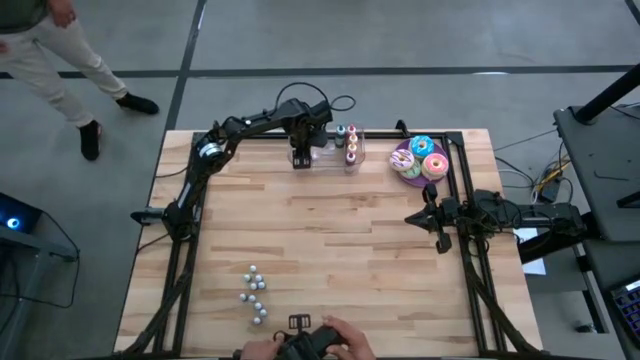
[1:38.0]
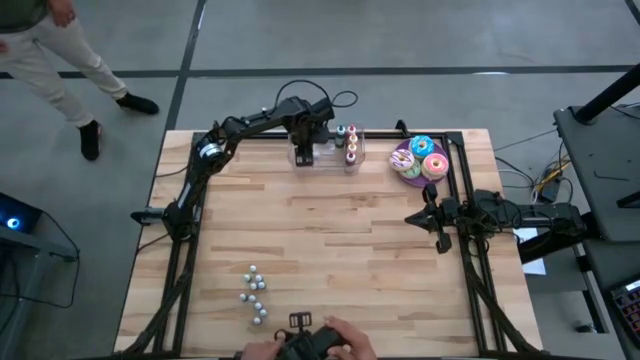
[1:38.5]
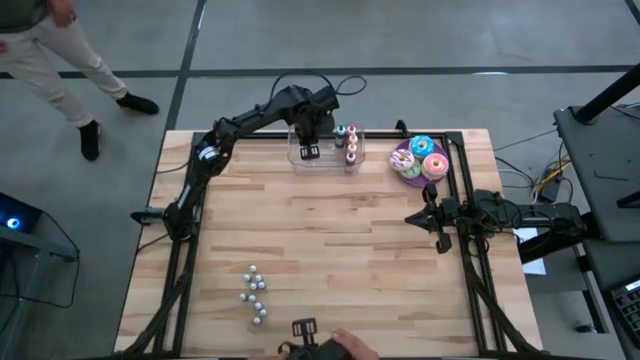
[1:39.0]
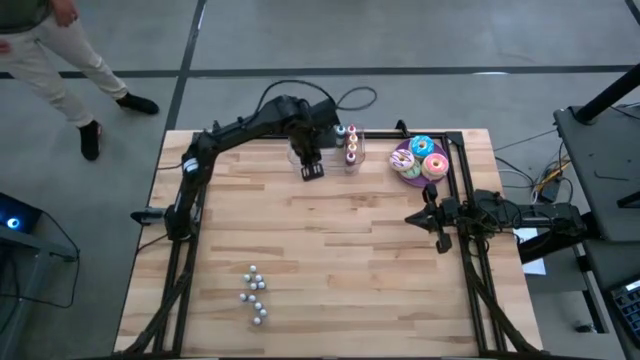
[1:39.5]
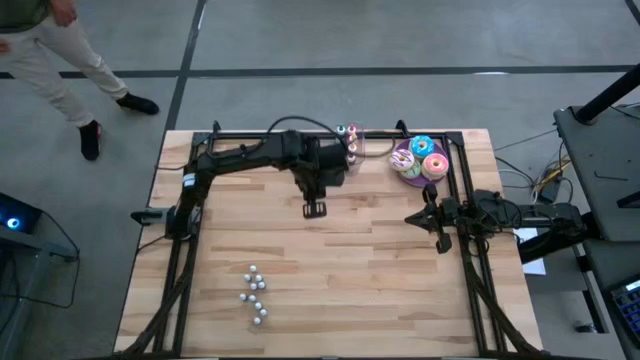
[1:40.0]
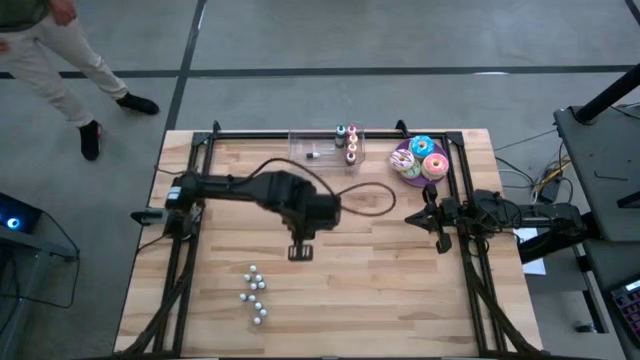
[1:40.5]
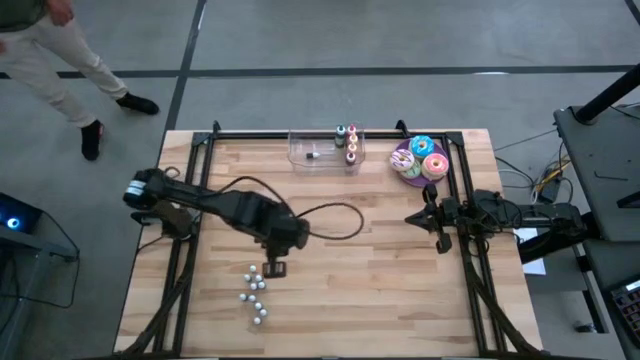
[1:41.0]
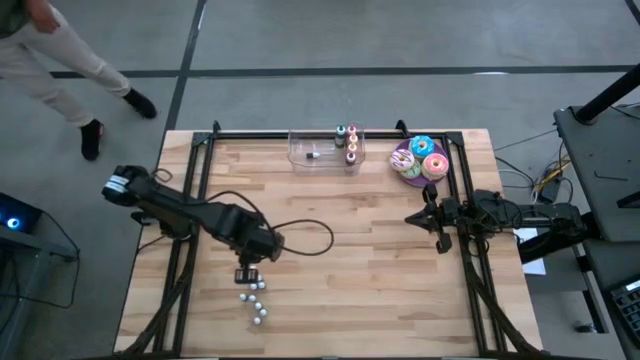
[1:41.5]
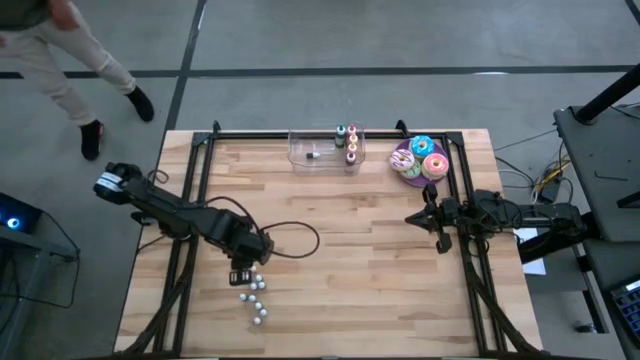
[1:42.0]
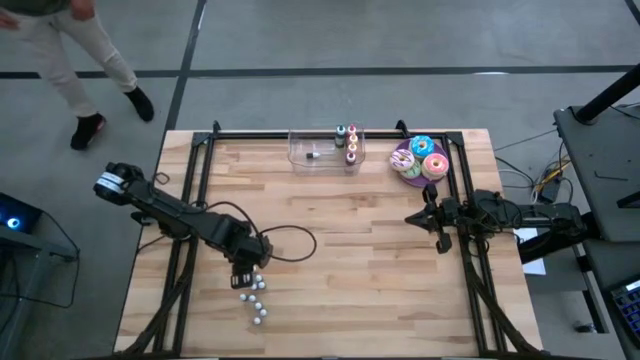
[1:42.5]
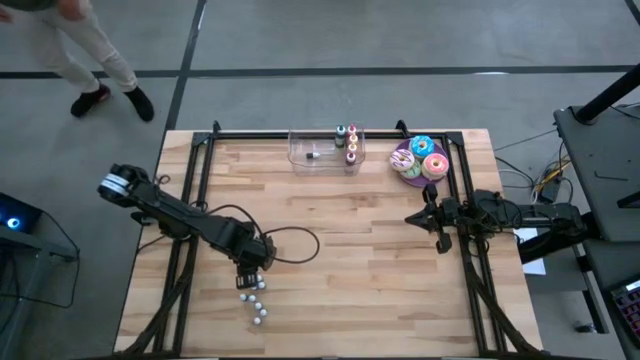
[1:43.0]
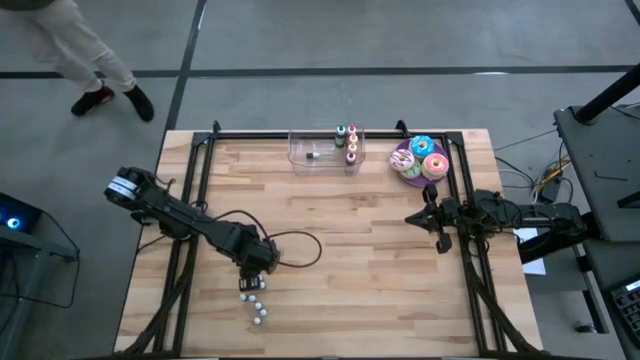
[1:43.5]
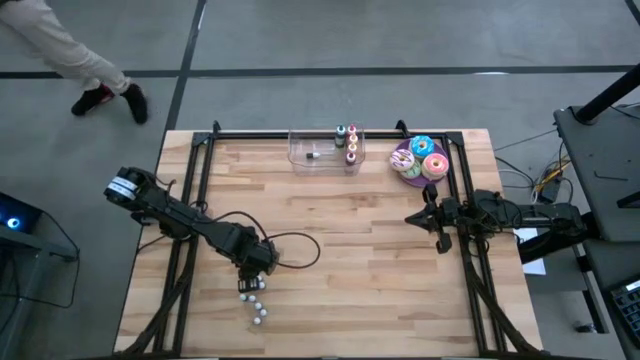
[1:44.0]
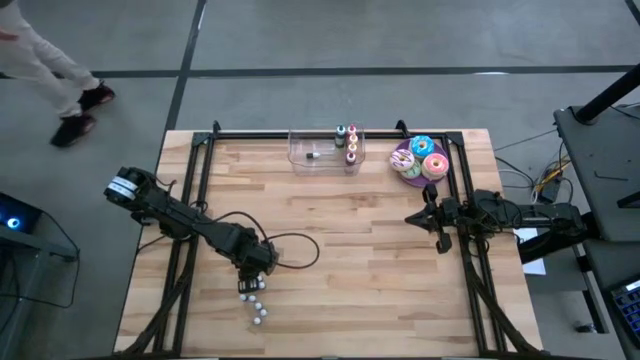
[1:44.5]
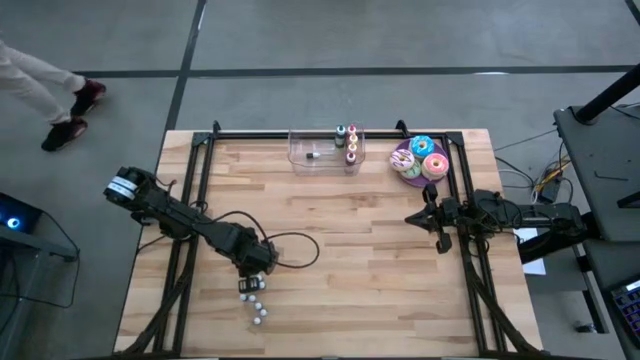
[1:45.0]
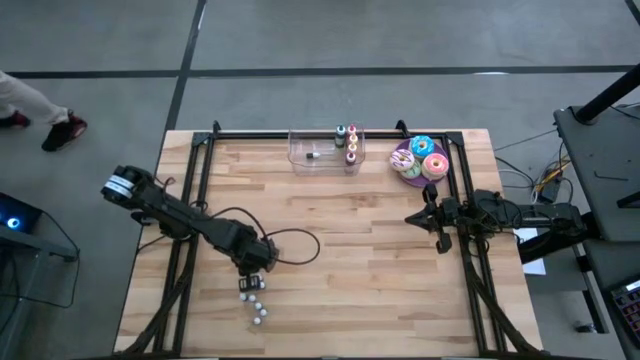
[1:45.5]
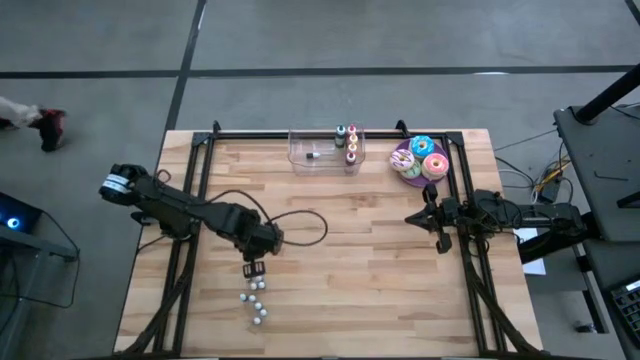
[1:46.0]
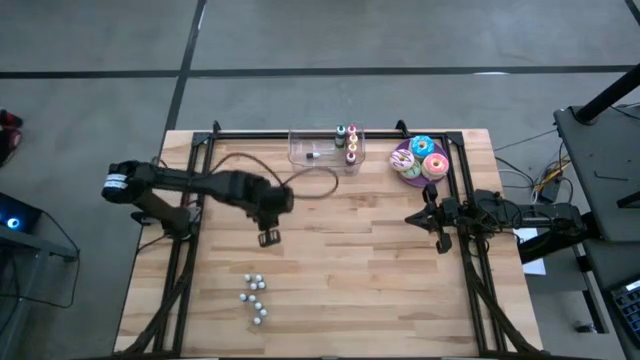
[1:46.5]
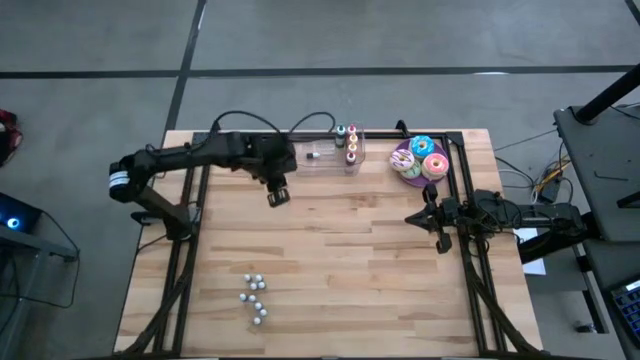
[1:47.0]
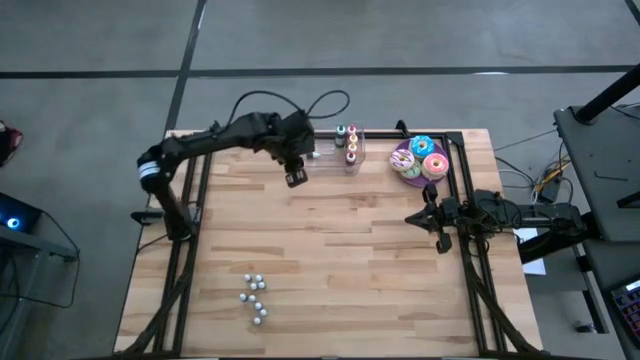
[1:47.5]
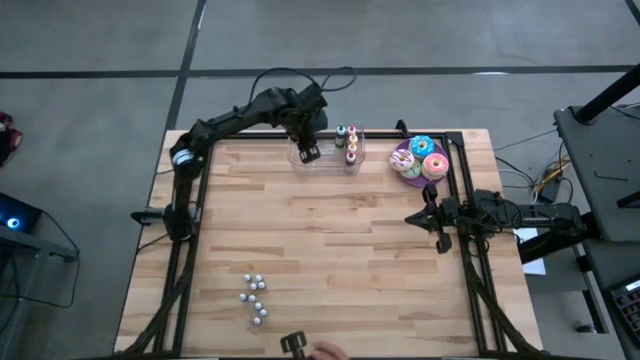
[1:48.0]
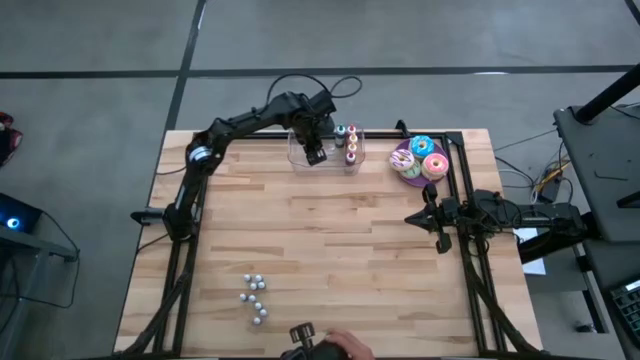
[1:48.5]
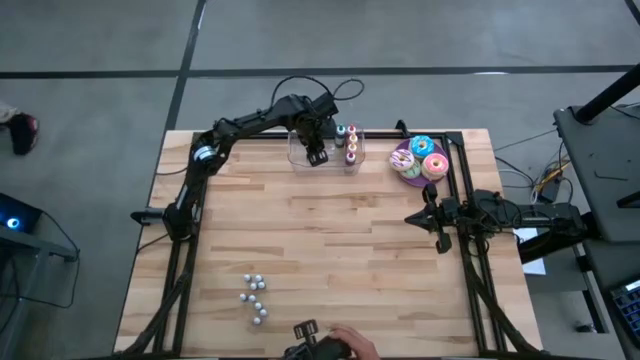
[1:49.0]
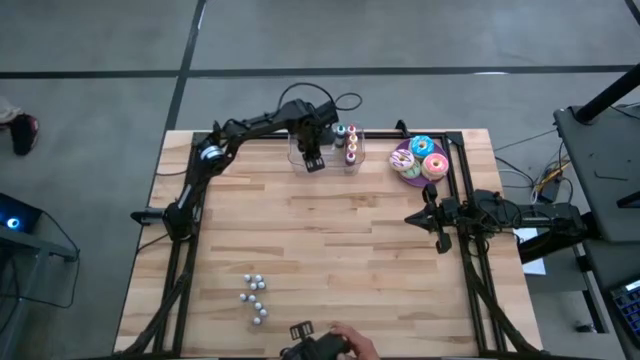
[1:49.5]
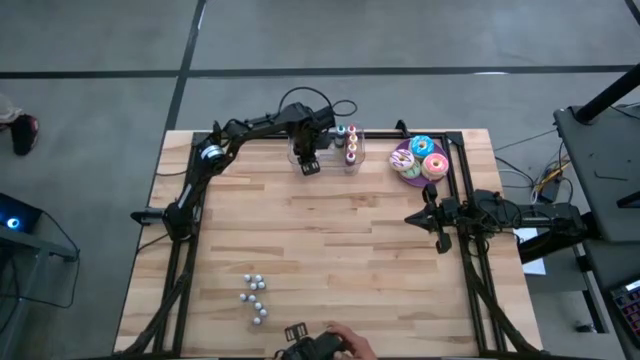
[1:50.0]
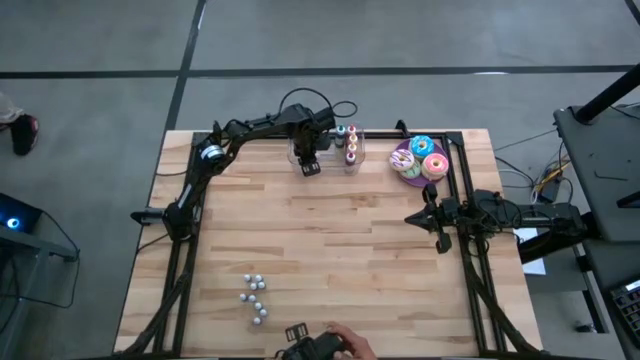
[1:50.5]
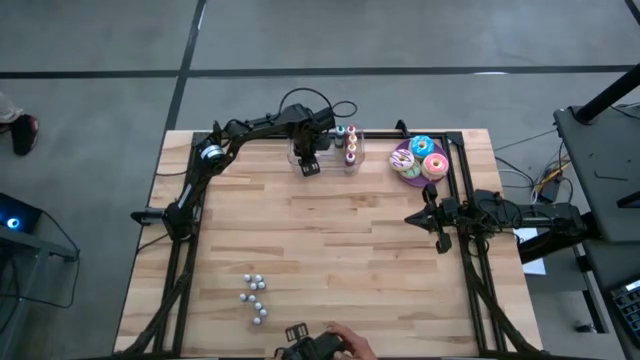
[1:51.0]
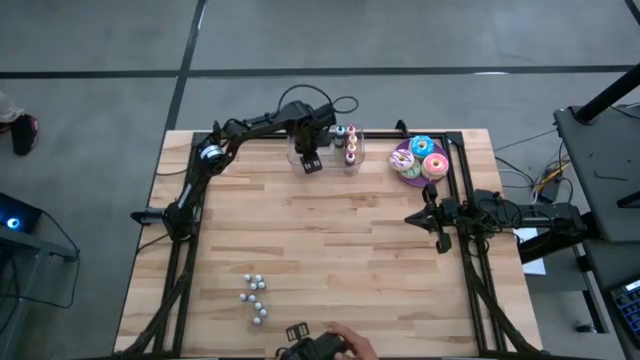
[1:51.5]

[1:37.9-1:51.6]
Task: Pick & Place food coloring
Put the small orange food coloring bottle into the transparent bin

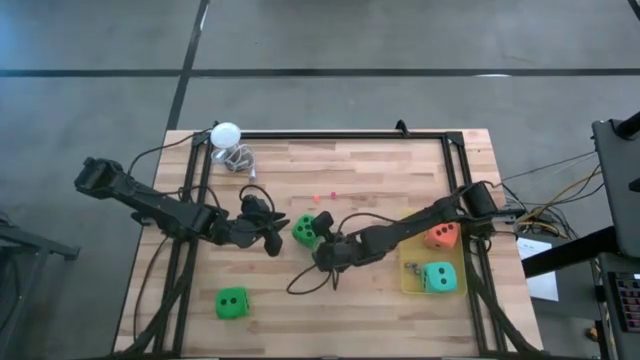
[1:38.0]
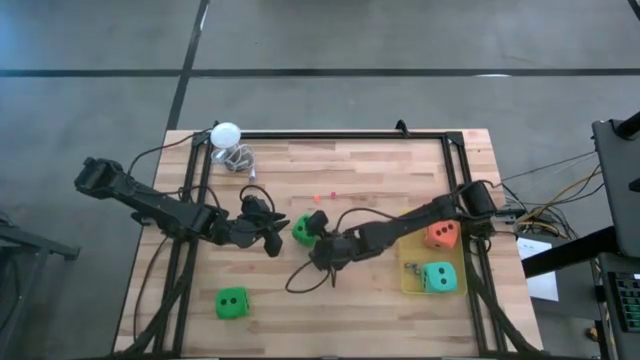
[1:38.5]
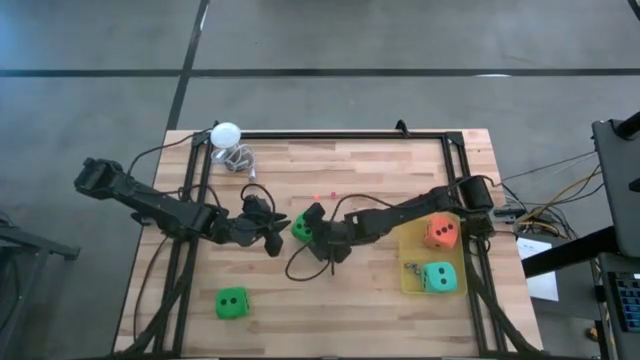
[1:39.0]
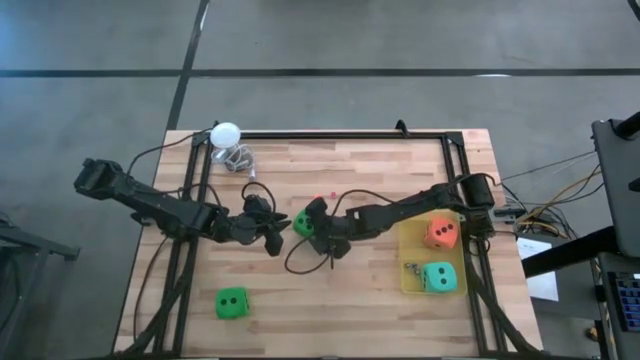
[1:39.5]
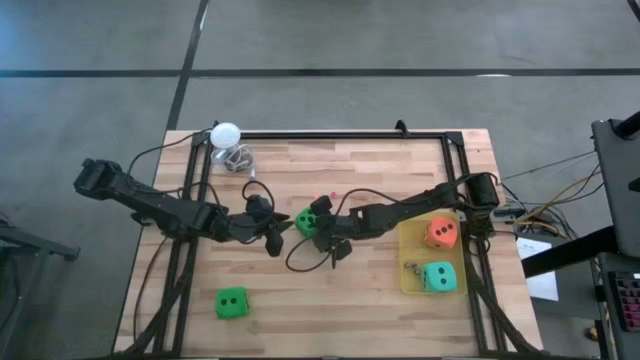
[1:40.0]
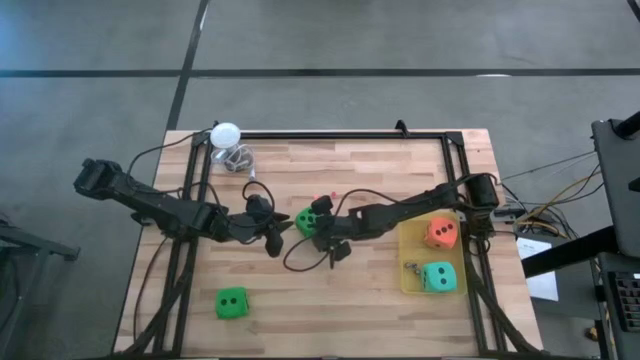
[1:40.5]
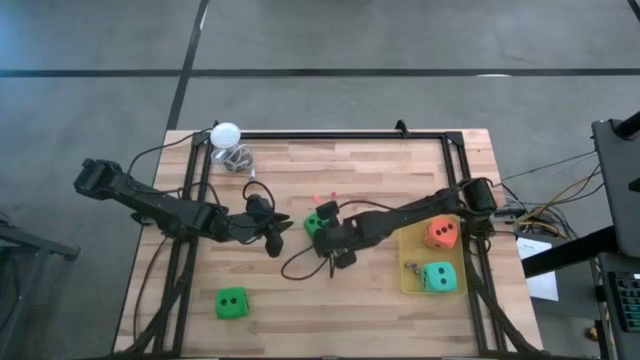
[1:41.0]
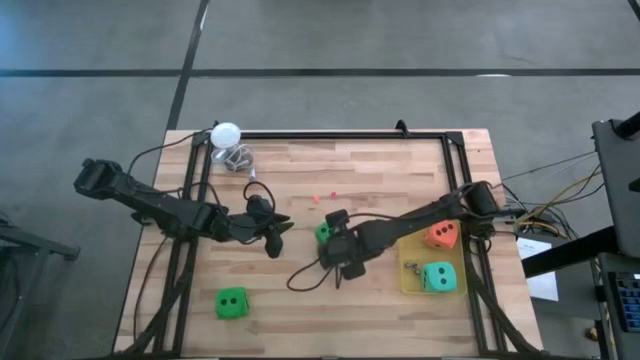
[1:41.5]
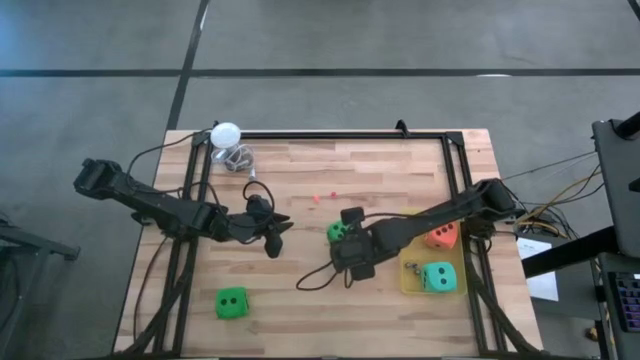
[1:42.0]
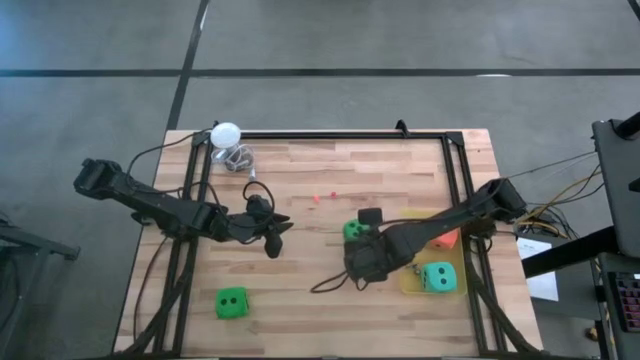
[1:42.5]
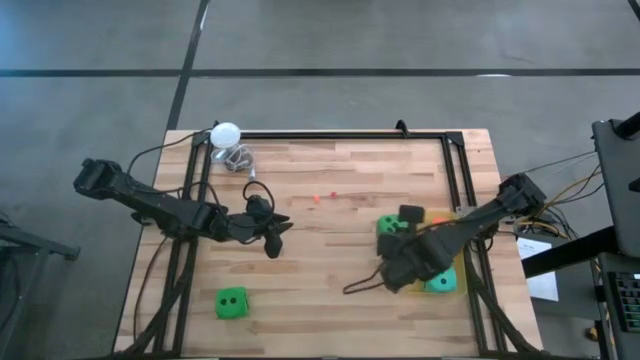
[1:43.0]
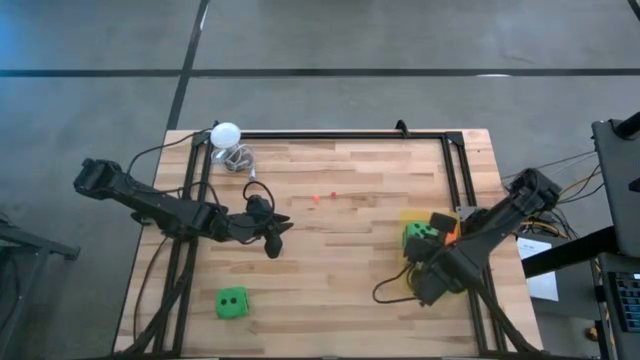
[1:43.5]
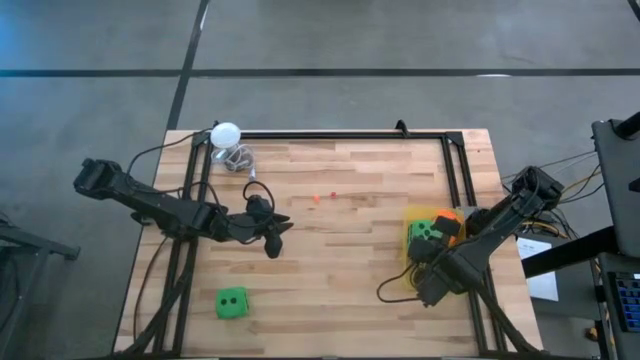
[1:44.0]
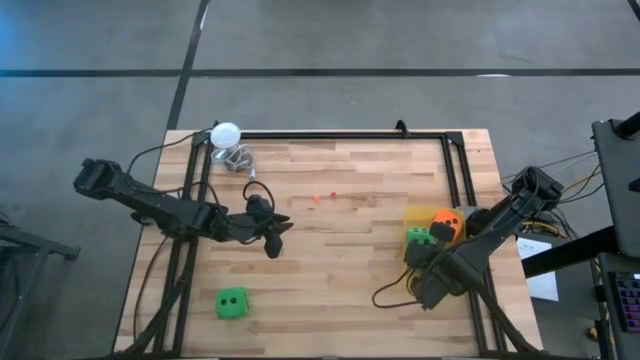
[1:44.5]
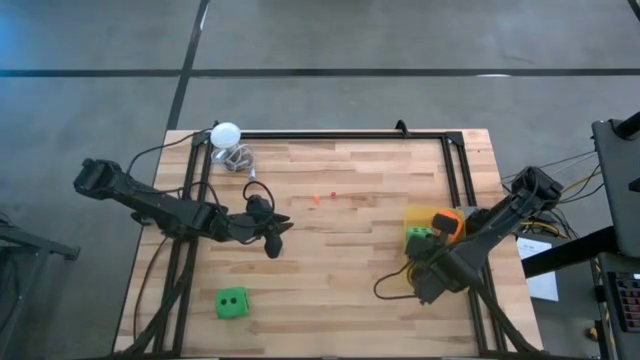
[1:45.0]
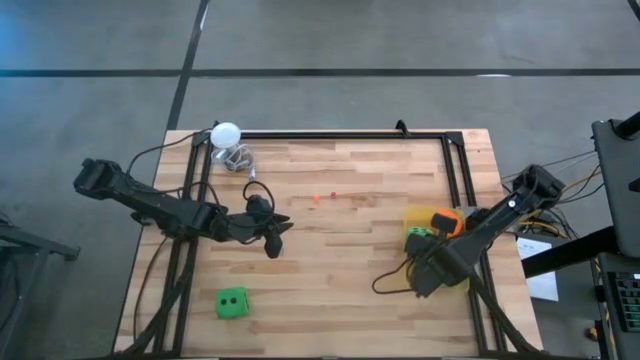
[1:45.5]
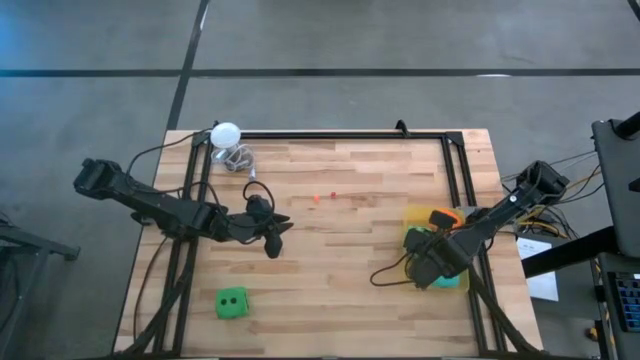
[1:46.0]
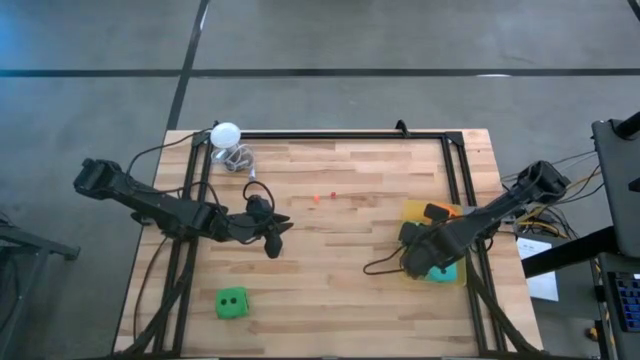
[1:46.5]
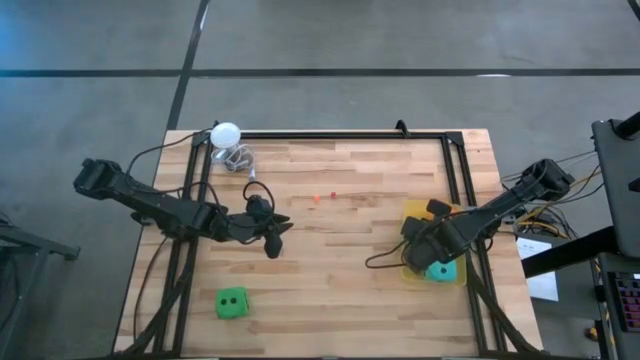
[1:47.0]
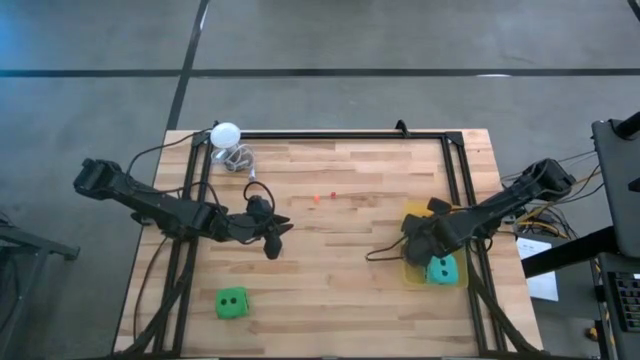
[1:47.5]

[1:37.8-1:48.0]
Task: Pick & Place Dice
Put the top large green dice into the yellow bin
